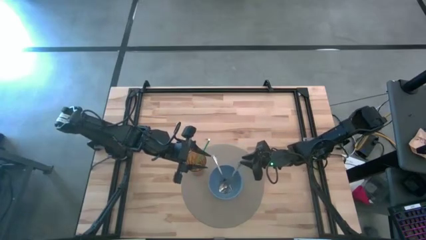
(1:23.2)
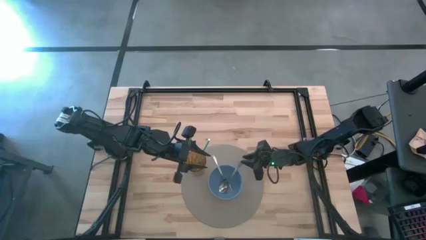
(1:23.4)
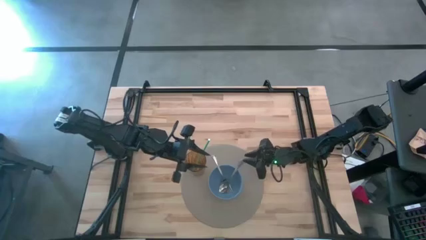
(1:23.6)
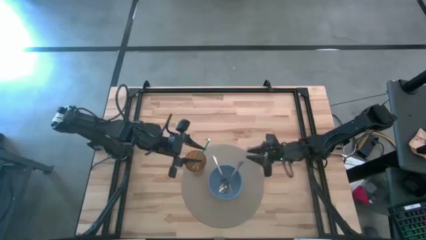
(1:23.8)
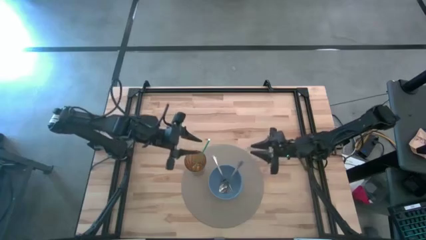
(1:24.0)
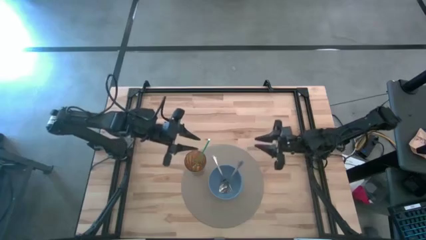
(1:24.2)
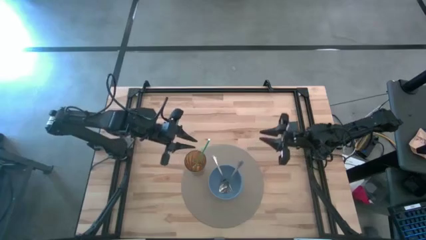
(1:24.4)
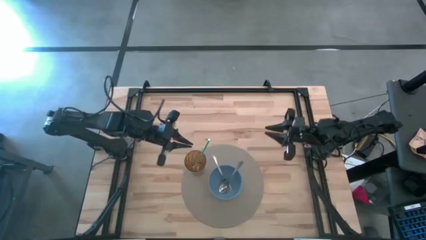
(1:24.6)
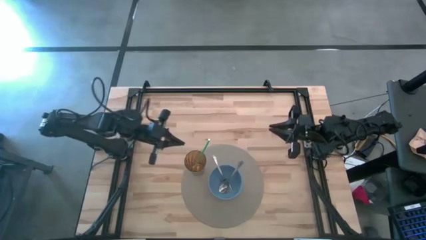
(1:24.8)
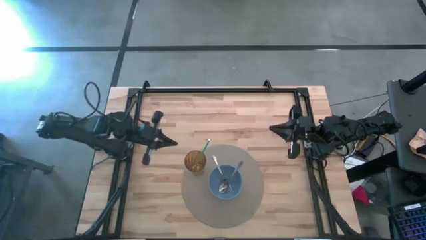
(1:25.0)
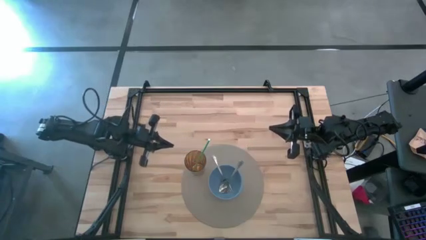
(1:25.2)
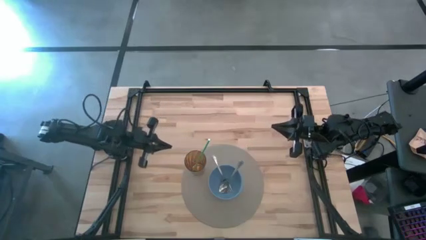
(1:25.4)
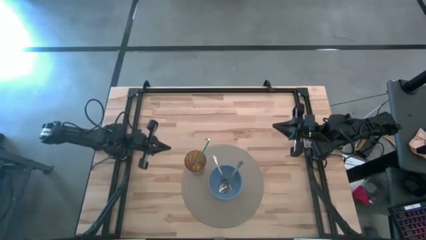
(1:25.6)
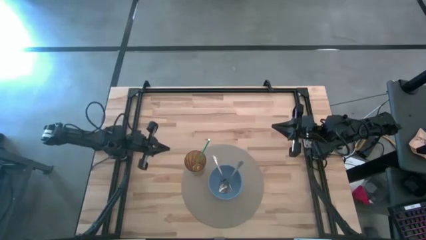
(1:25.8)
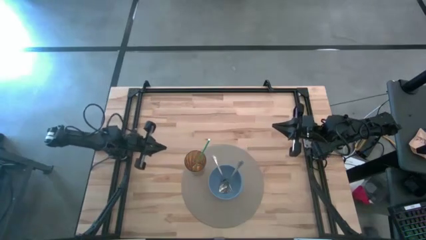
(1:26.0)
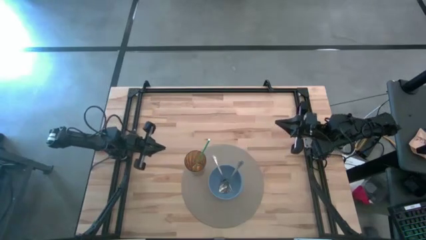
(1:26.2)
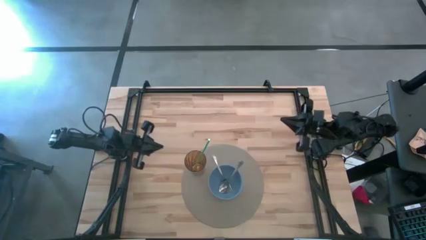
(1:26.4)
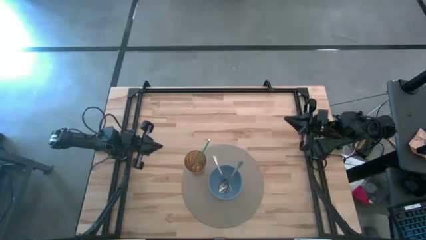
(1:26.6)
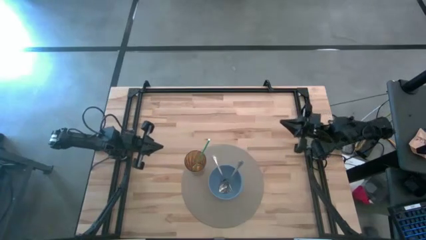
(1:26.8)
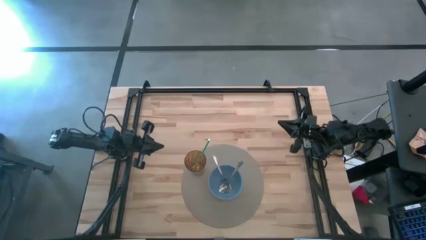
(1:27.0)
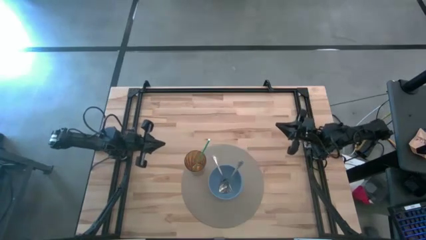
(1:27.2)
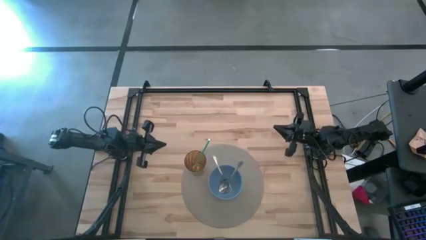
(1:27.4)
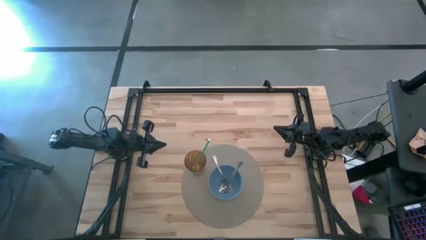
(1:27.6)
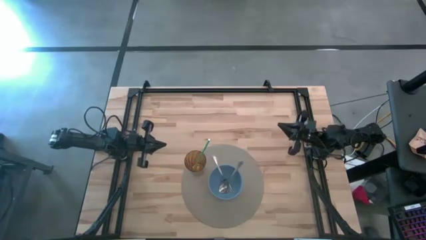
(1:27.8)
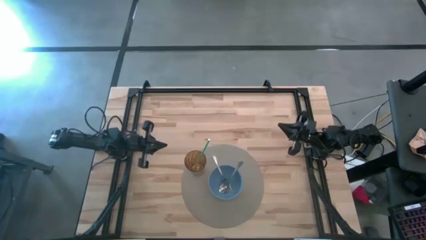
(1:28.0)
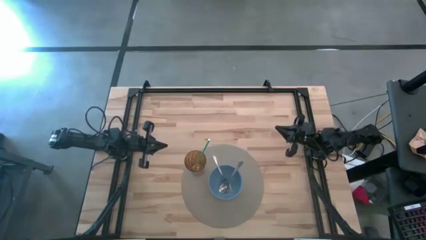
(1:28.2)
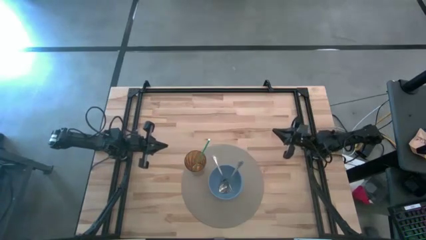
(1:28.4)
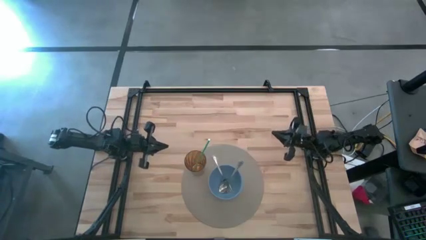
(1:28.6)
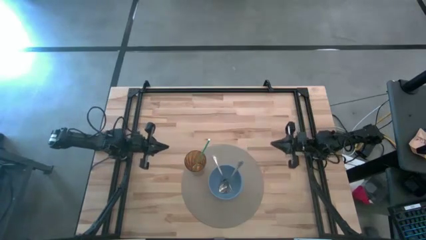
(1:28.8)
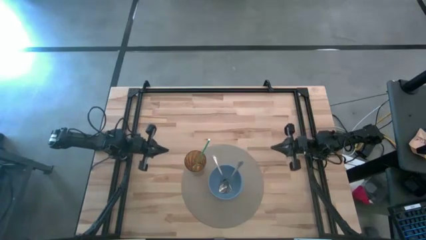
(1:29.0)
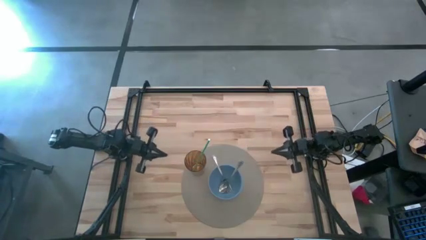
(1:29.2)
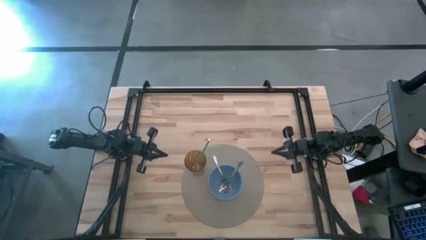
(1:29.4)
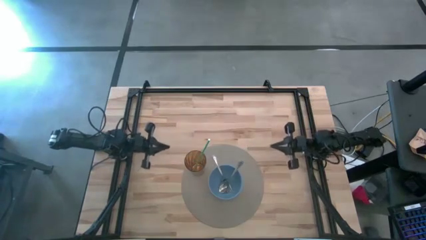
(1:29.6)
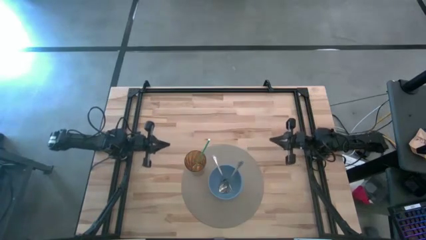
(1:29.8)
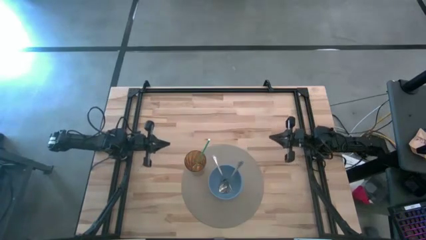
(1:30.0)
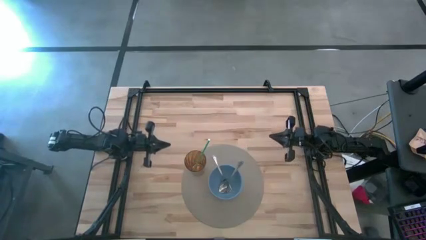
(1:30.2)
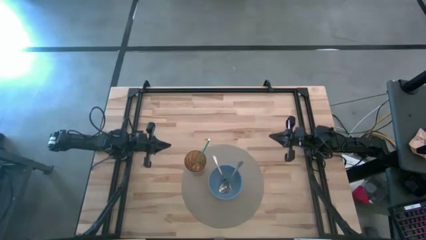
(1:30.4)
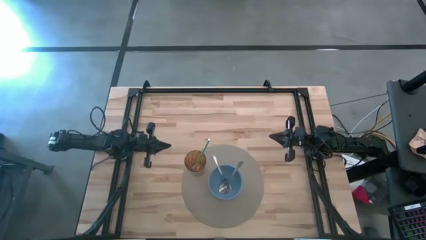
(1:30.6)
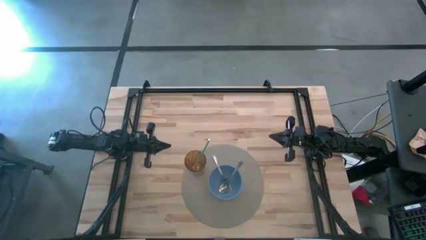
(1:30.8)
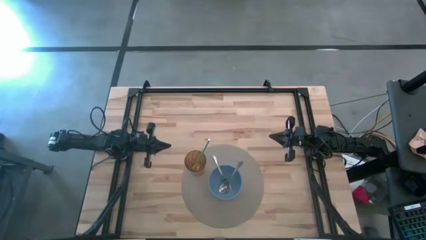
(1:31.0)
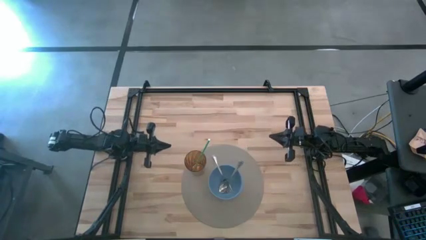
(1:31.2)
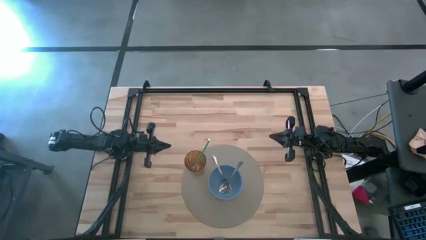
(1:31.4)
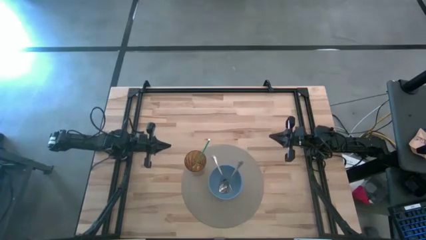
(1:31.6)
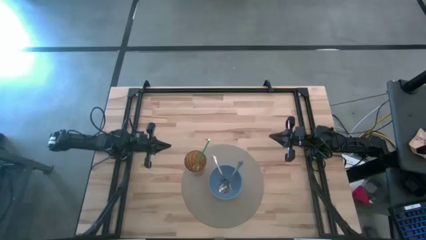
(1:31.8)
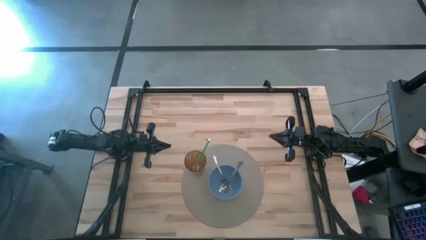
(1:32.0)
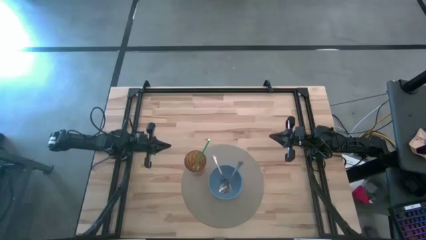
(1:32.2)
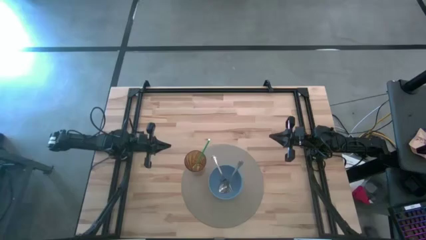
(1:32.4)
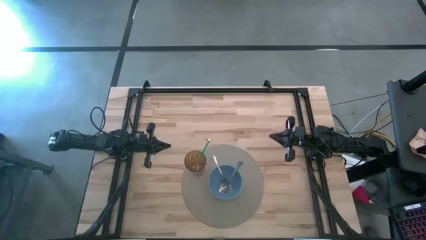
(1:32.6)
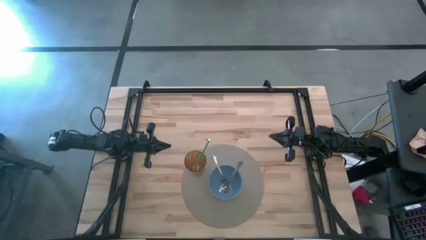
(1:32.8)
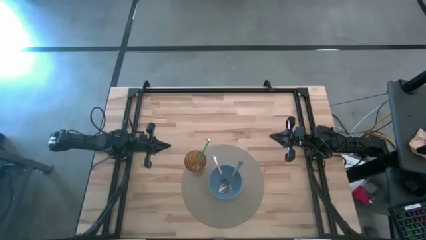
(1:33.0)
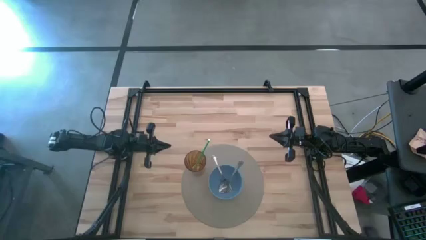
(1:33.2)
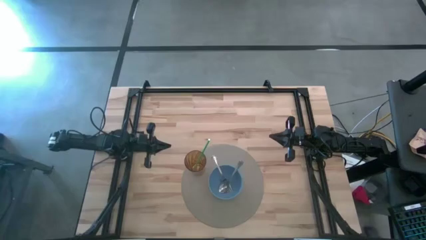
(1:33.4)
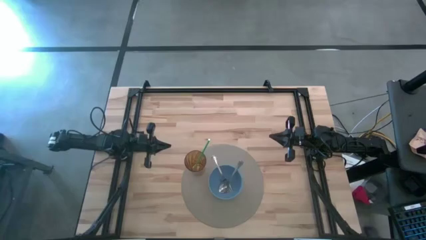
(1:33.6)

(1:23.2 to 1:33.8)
Task: Pick & Place Utensil
Return to Home Position

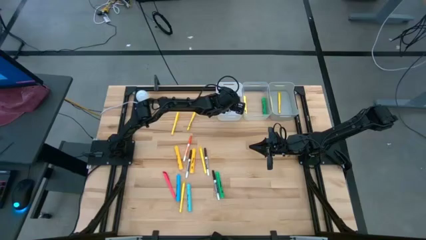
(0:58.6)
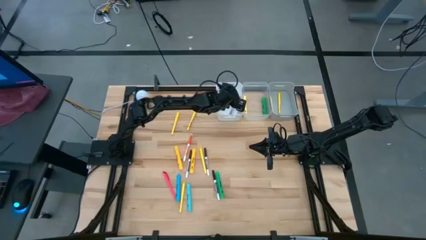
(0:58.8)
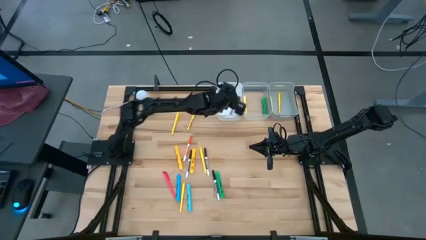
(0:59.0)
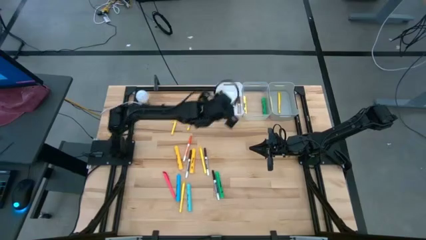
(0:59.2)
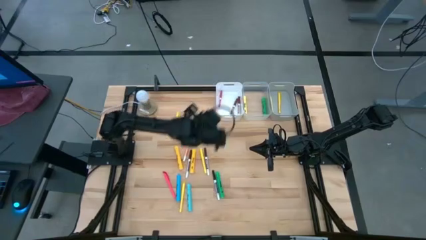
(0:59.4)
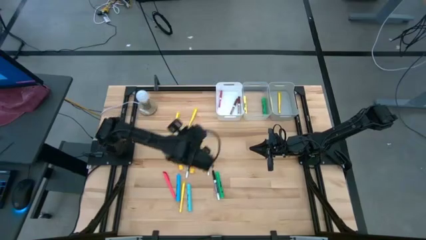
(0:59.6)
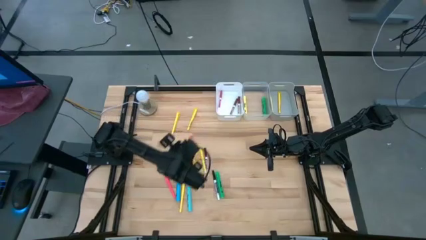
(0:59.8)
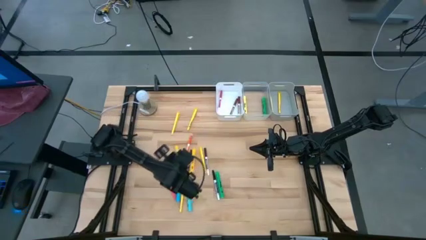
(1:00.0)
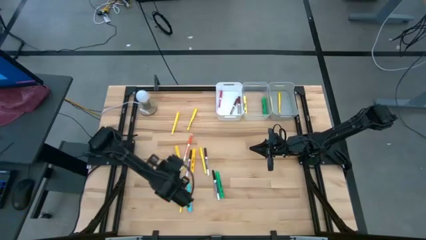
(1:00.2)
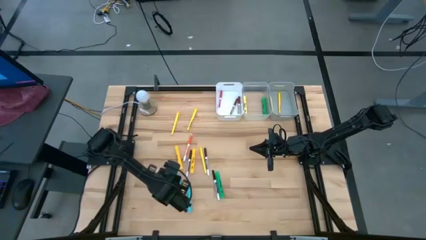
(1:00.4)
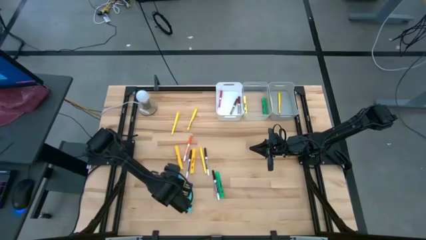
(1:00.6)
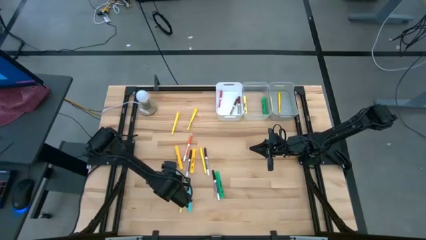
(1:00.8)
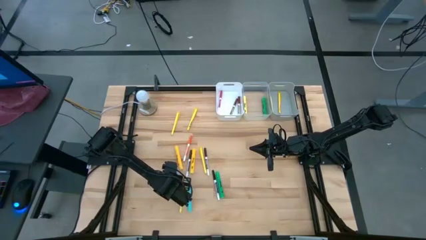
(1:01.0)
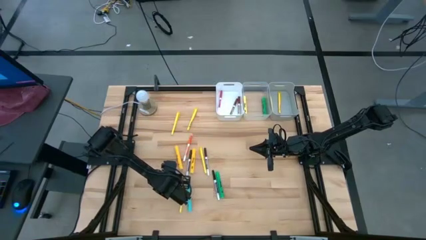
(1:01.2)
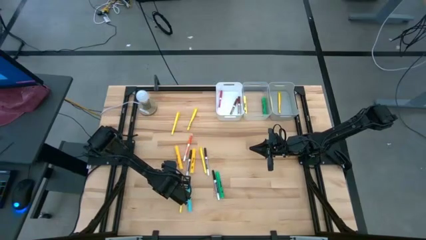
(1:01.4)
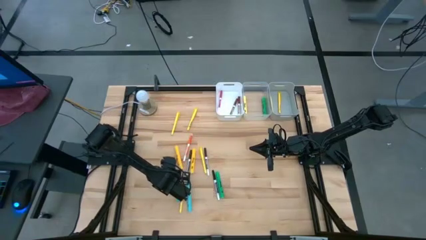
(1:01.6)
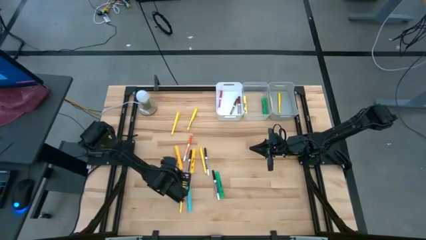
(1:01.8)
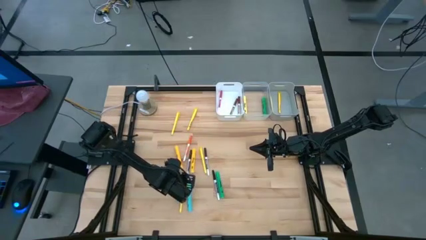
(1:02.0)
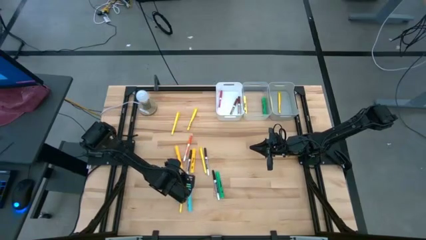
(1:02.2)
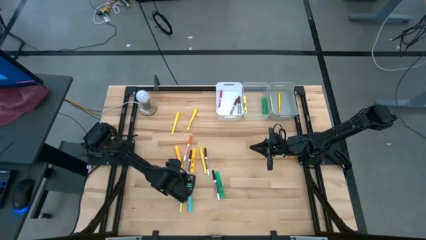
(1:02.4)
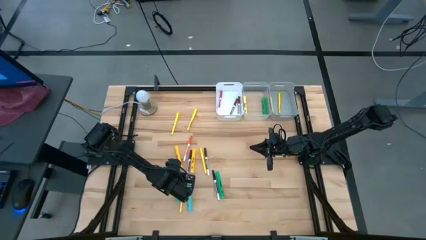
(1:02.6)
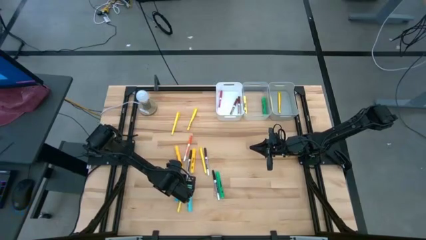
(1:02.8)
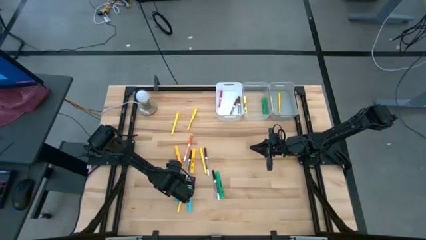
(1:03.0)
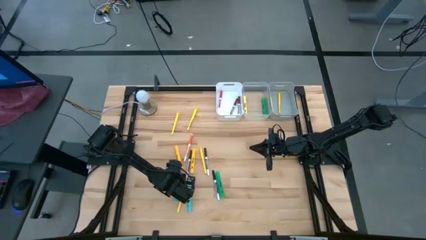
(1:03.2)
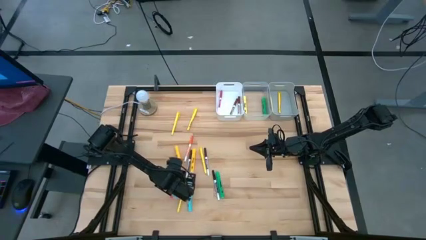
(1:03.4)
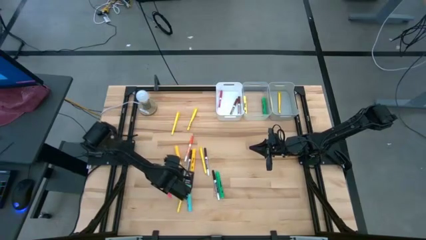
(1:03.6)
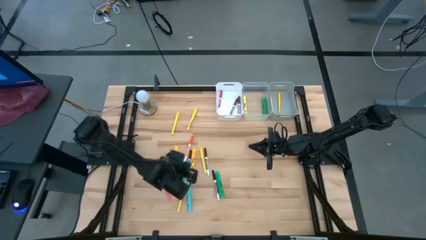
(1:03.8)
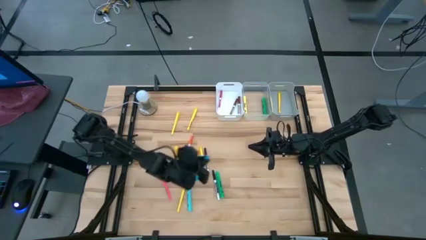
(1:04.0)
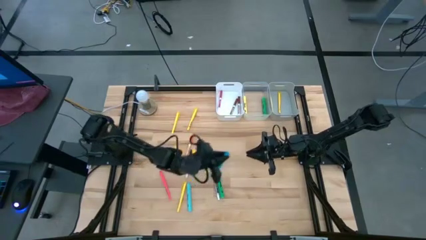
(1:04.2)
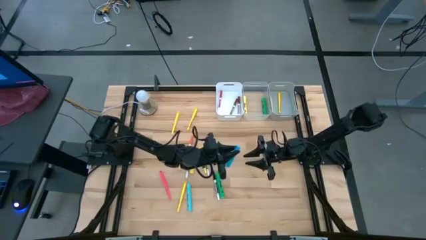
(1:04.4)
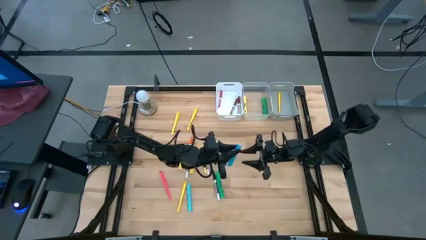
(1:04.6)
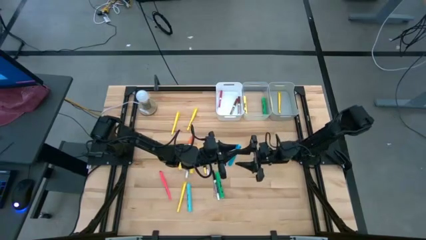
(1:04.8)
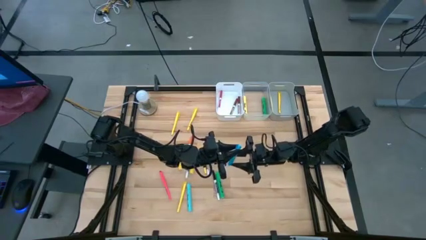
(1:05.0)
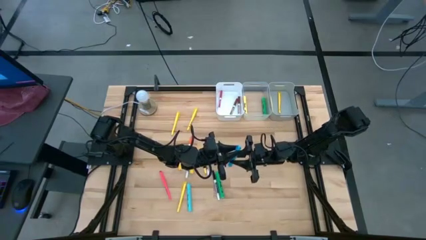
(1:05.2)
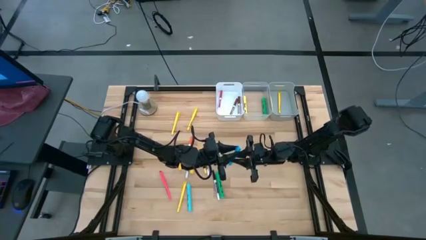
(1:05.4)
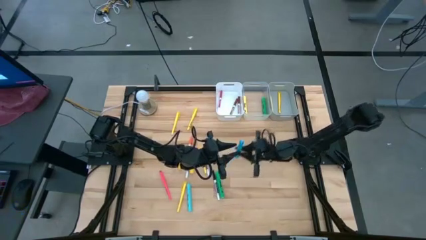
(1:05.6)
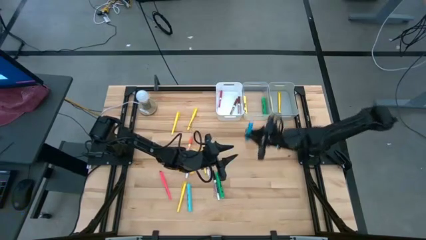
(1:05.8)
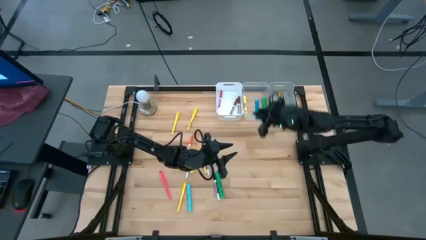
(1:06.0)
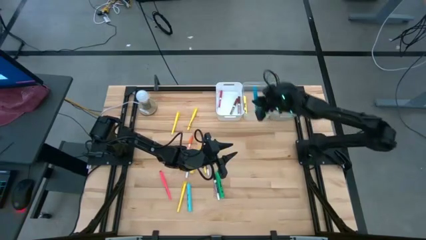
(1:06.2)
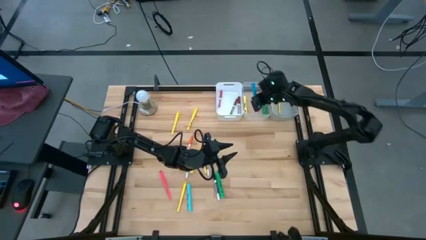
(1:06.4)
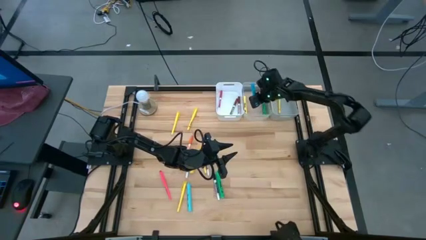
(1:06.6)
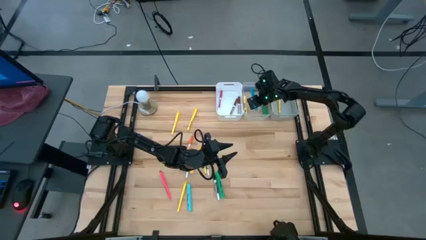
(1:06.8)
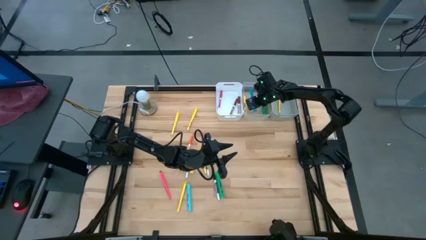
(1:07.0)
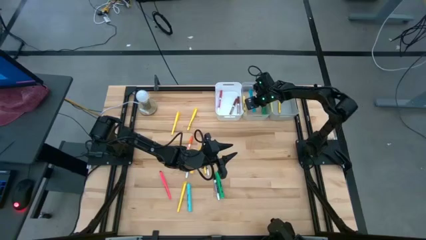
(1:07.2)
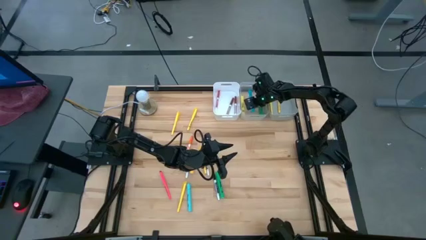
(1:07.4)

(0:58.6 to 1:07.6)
Task: Pick & Place Markers
Put the blue highlighter pen into the transparent bin
